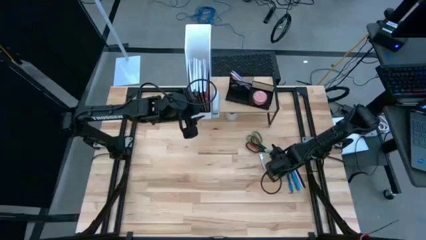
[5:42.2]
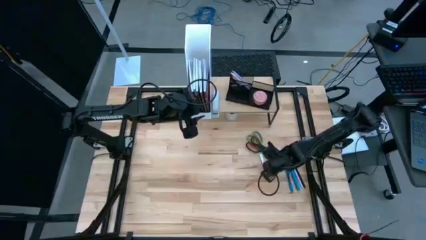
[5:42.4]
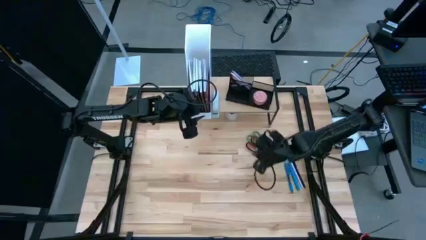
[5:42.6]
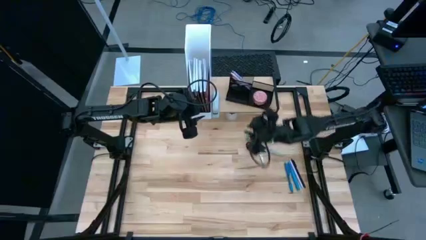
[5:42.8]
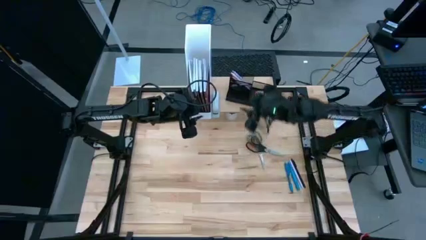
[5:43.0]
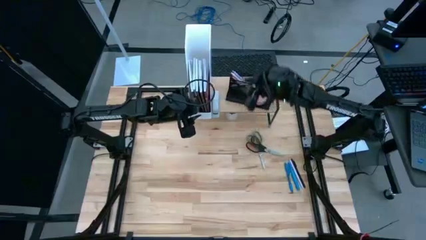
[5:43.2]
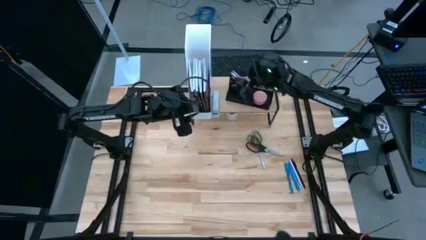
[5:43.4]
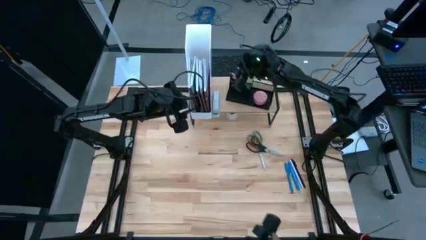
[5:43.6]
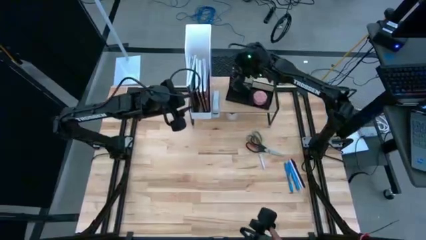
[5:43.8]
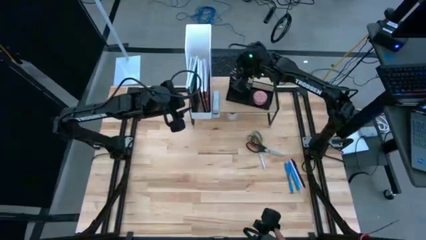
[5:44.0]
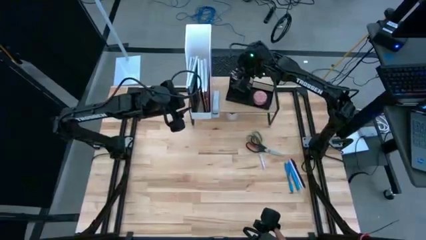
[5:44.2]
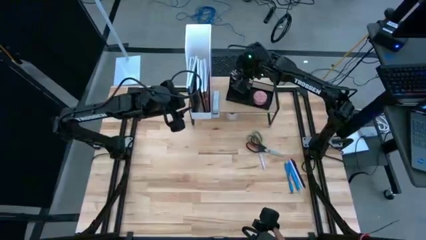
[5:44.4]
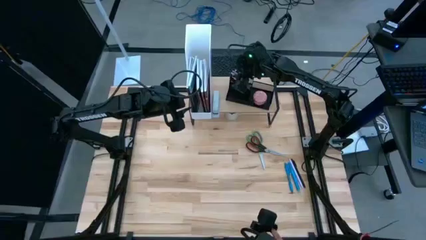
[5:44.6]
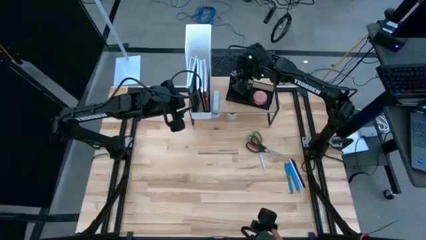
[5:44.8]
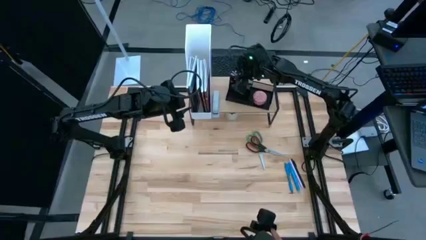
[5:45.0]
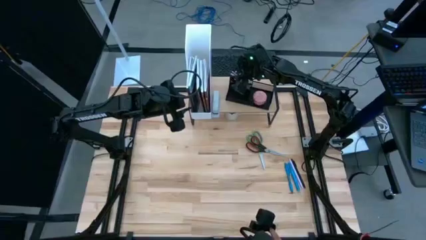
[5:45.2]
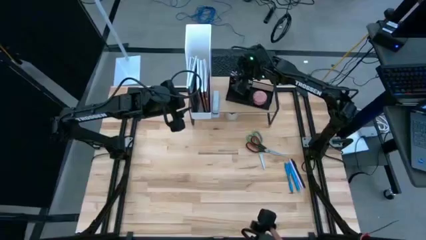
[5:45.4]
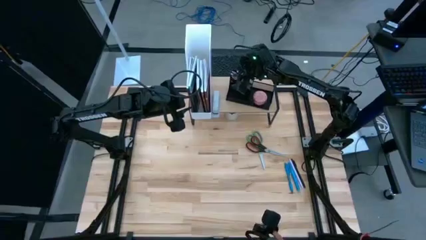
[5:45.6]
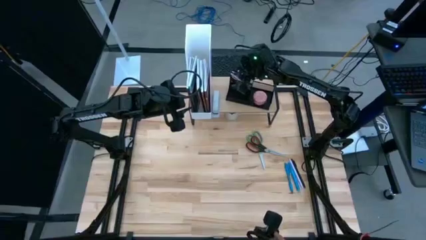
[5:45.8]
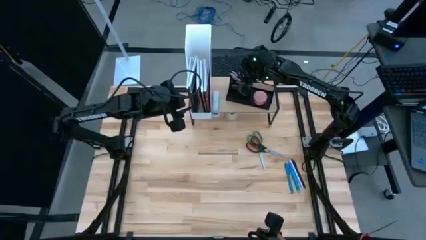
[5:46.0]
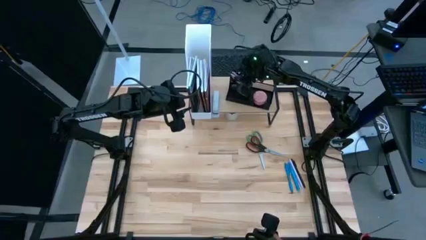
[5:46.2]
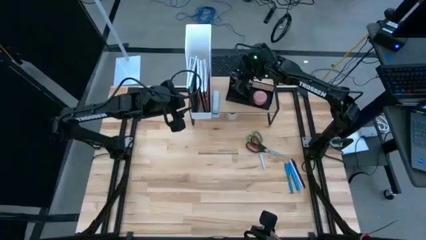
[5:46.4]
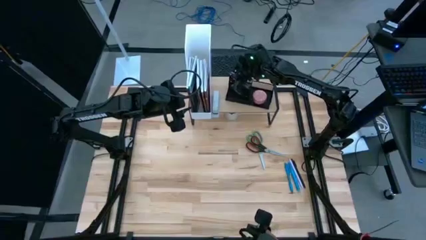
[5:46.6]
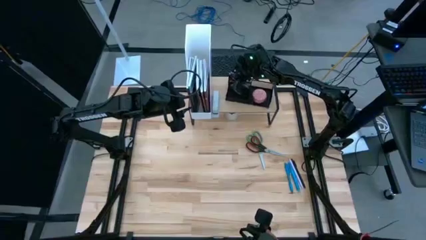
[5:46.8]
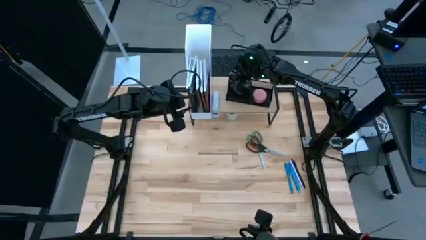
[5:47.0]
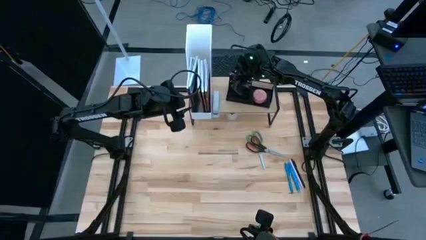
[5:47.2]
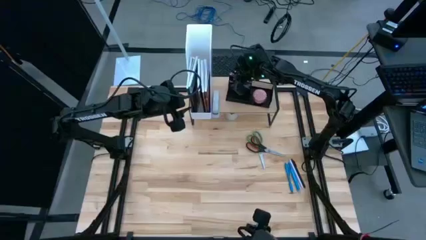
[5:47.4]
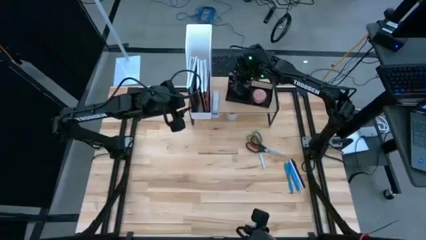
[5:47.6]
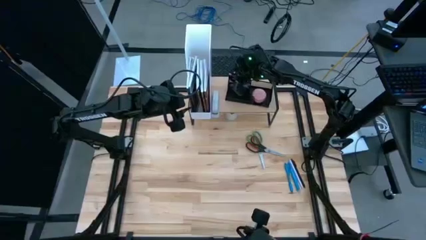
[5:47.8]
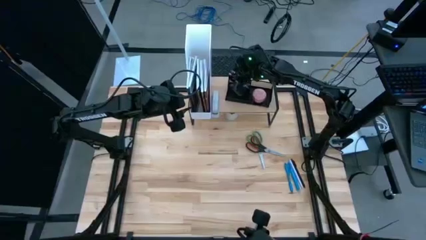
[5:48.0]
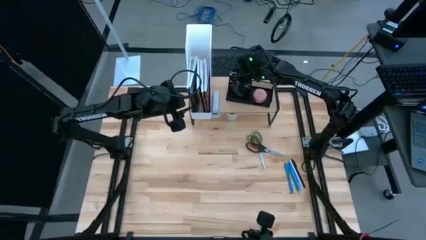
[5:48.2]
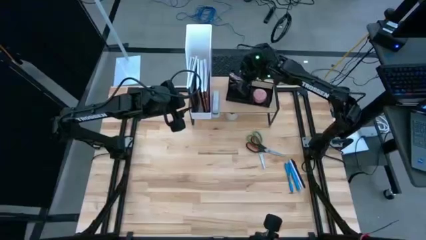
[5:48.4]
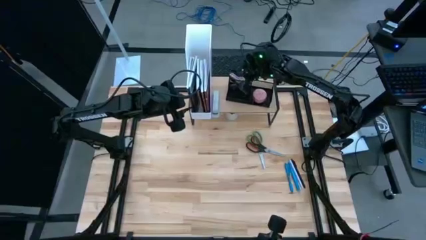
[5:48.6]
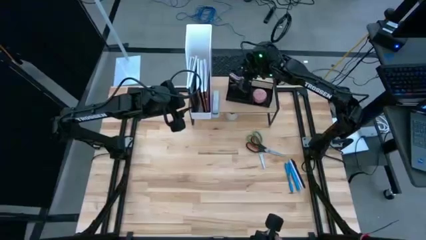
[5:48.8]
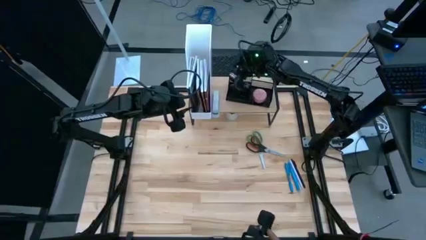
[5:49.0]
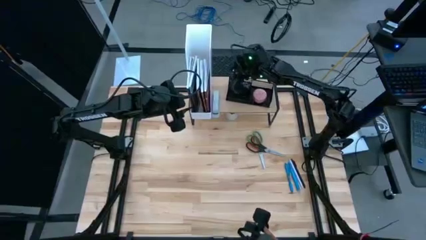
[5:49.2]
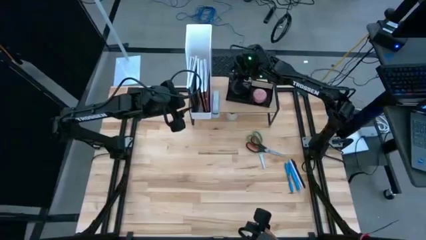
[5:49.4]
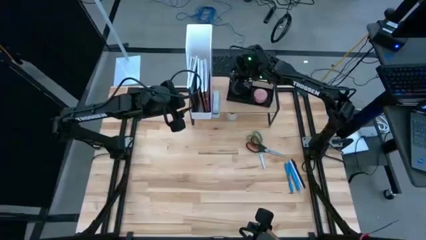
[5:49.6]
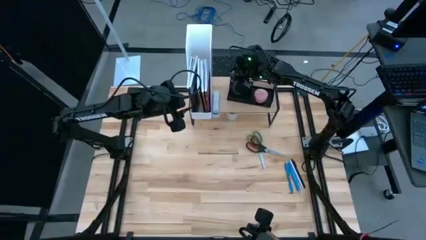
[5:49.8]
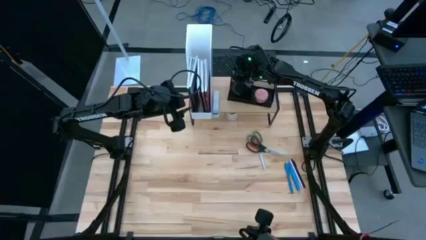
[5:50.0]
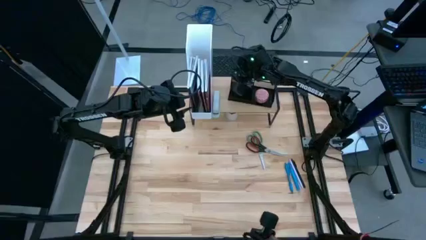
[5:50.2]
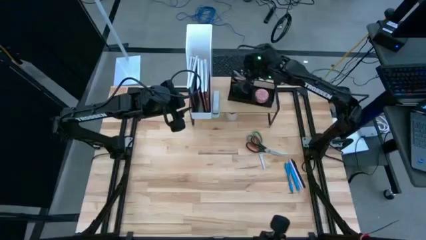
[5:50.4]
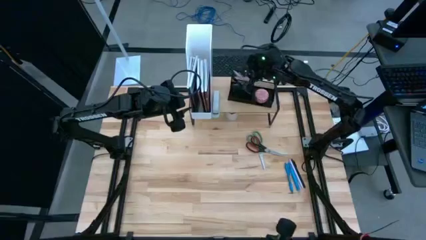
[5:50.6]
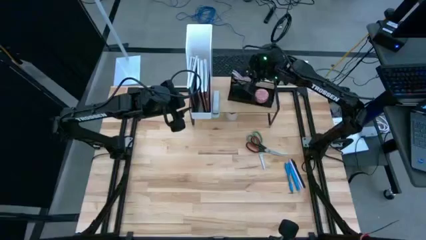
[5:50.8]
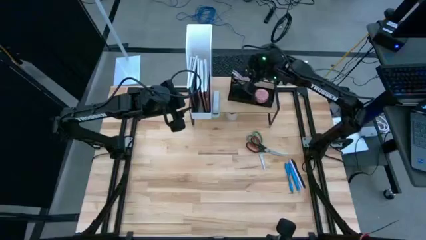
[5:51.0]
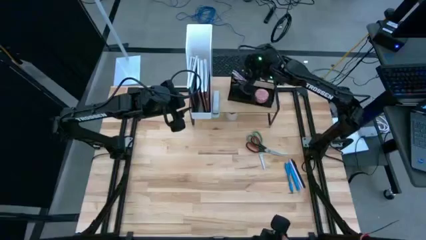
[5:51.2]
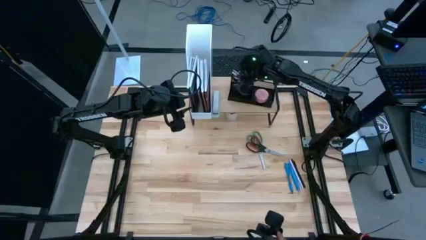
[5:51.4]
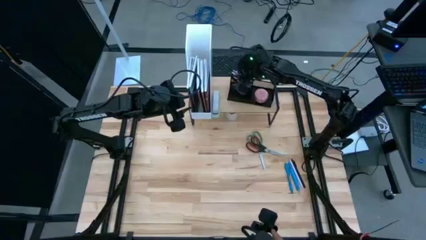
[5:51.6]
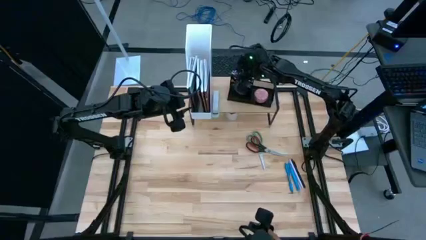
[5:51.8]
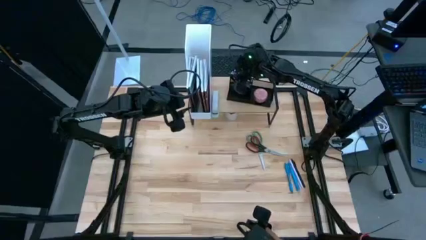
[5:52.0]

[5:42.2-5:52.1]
Task: Stock shelves
Remove the pink pen from the desk organizer on the shelf

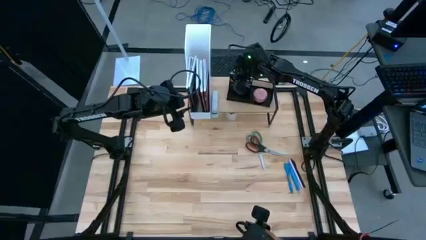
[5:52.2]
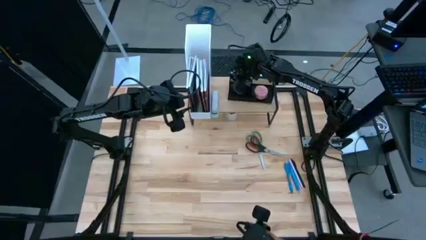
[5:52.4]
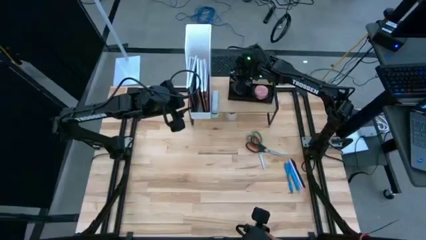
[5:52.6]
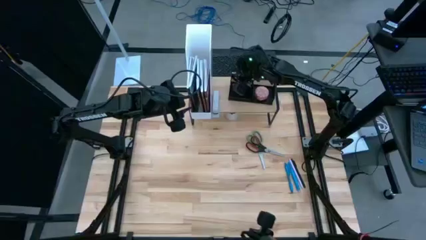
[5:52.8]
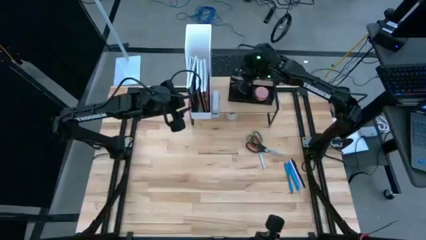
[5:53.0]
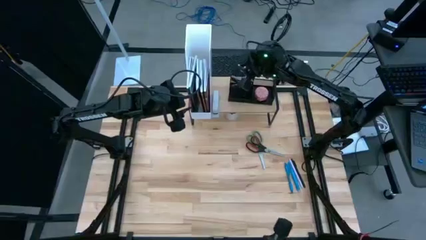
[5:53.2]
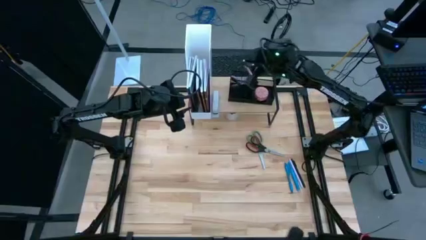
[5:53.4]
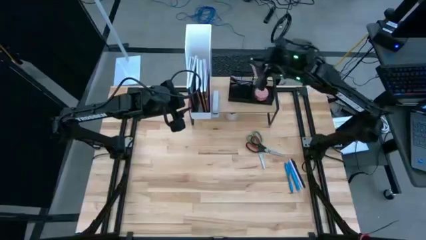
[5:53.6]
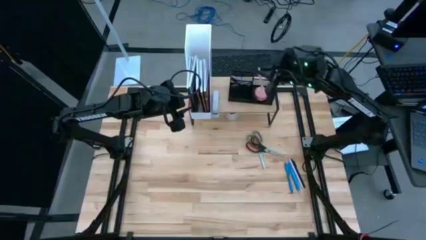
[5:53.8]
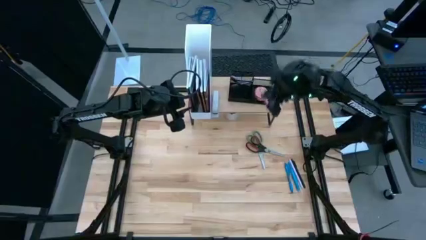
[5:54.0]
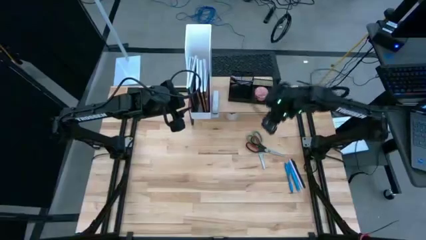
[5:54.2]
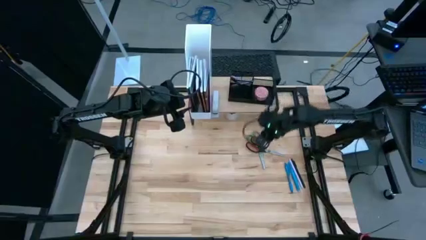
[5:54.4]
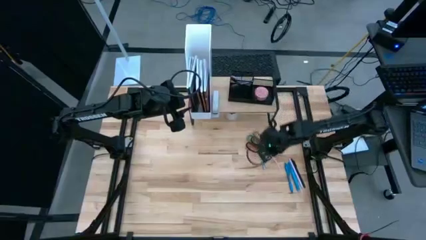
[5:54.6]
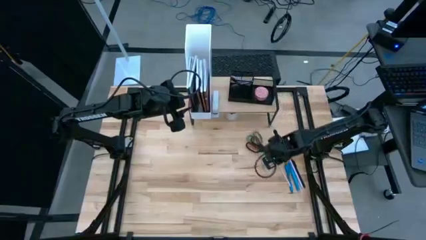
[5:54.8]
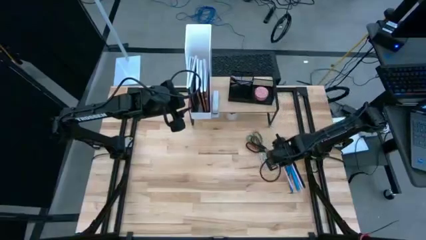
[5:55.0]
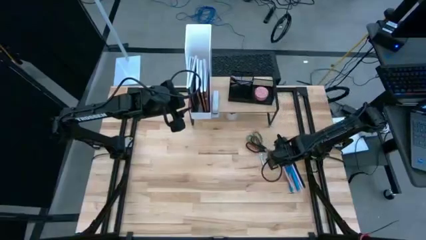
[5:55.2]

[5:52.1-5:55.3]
Remove the pink pen from the desk organizer on the shelf
